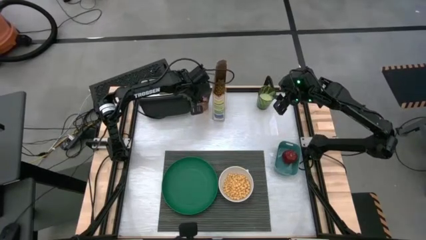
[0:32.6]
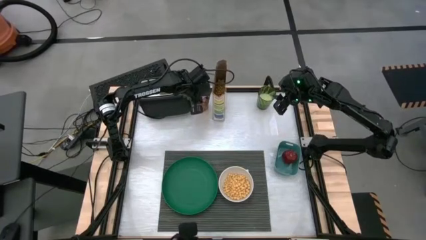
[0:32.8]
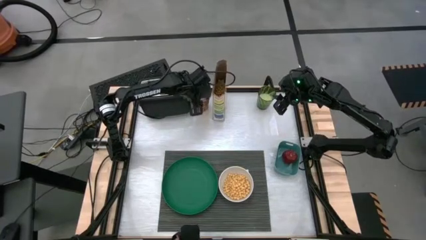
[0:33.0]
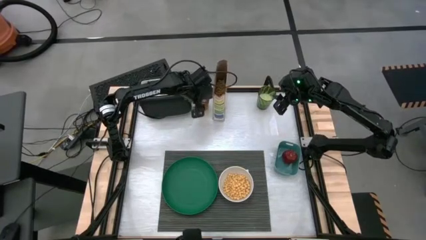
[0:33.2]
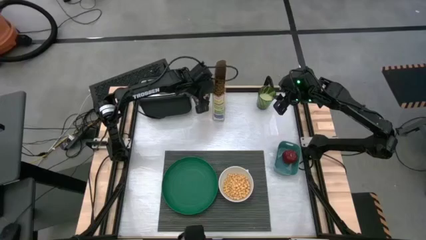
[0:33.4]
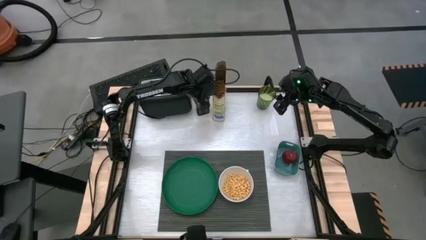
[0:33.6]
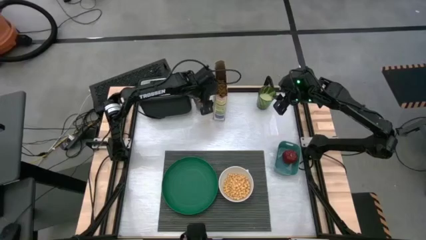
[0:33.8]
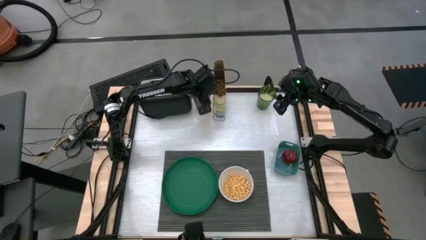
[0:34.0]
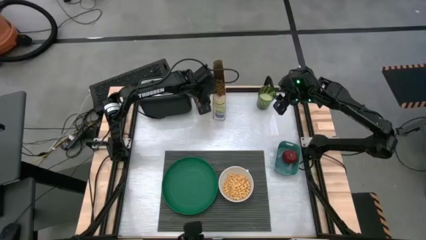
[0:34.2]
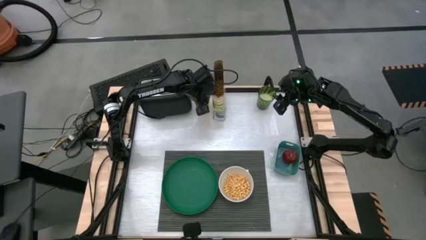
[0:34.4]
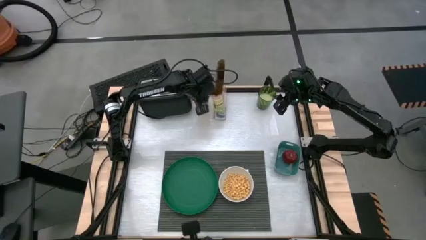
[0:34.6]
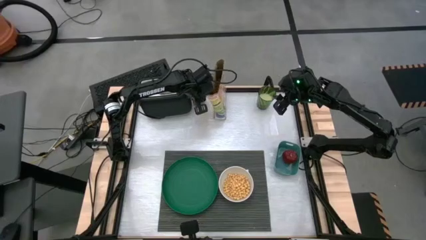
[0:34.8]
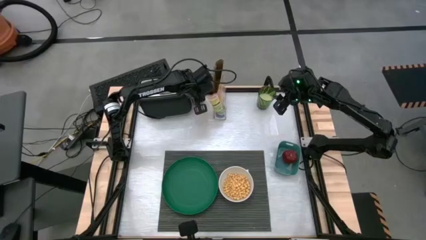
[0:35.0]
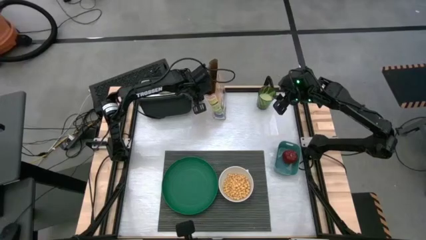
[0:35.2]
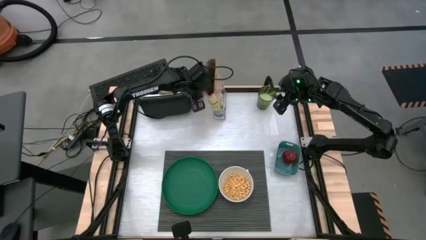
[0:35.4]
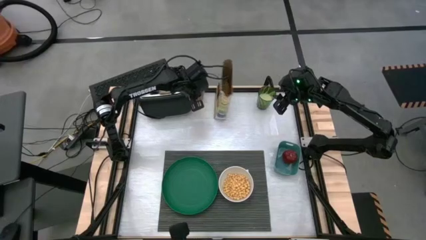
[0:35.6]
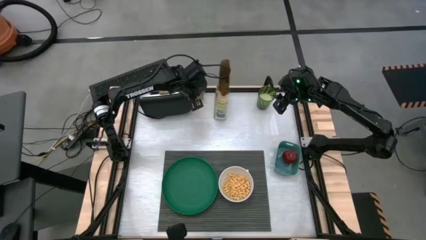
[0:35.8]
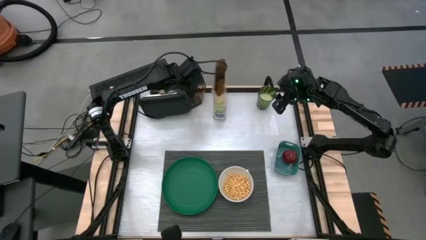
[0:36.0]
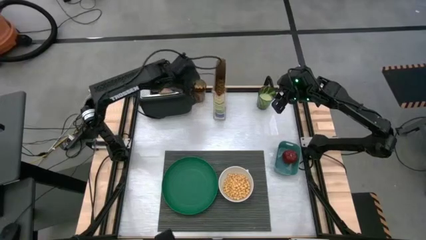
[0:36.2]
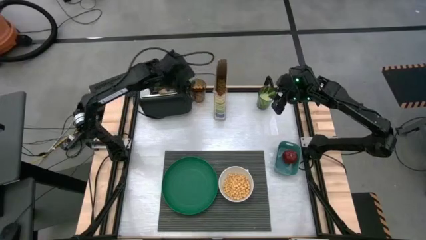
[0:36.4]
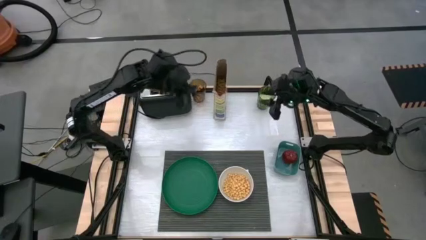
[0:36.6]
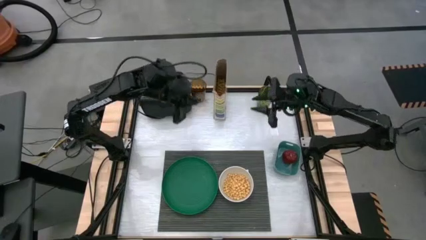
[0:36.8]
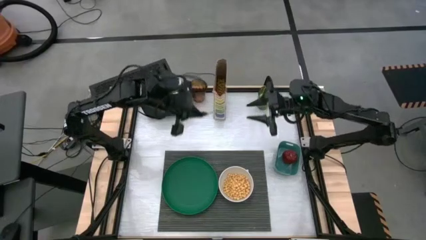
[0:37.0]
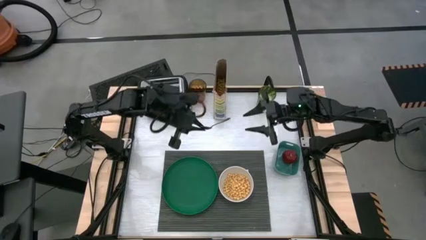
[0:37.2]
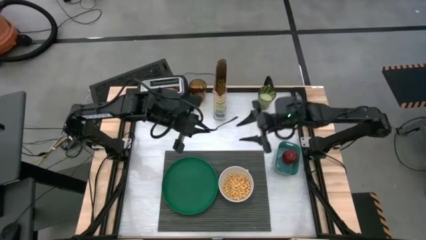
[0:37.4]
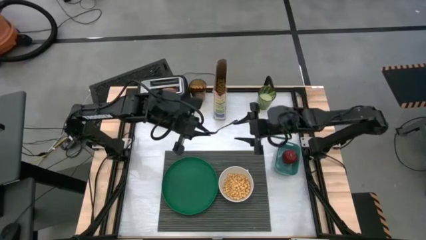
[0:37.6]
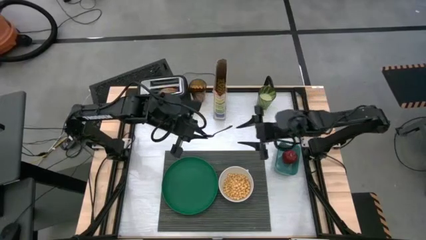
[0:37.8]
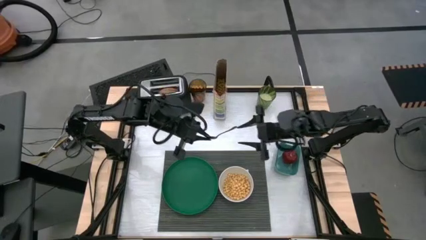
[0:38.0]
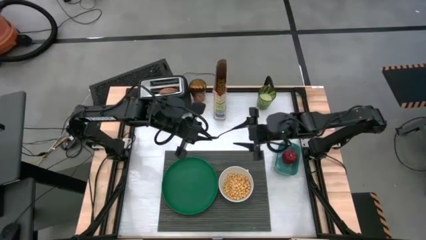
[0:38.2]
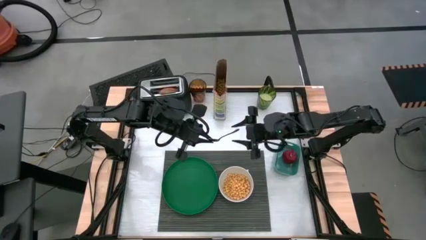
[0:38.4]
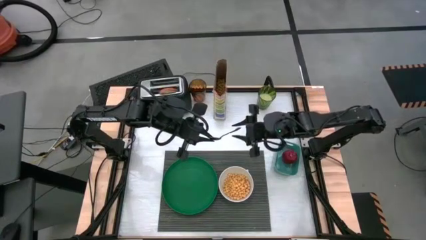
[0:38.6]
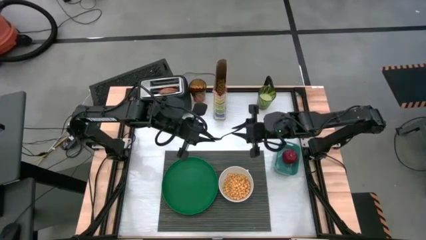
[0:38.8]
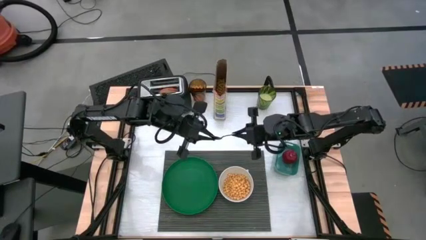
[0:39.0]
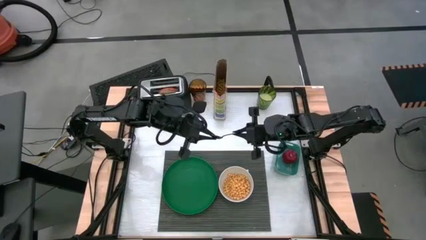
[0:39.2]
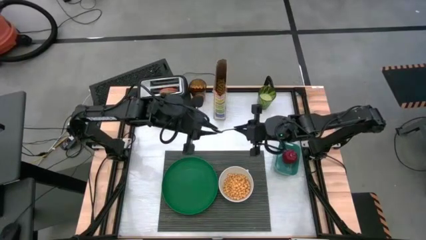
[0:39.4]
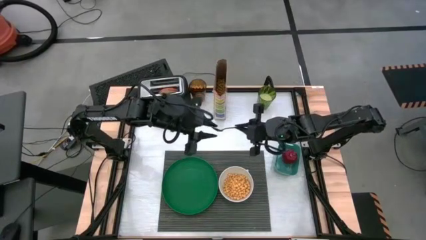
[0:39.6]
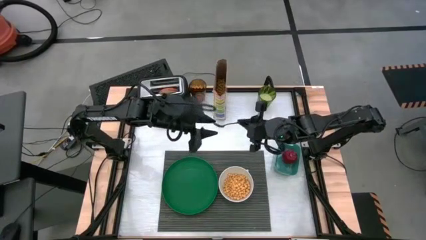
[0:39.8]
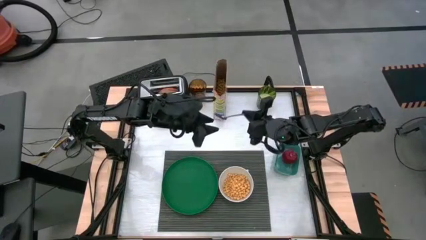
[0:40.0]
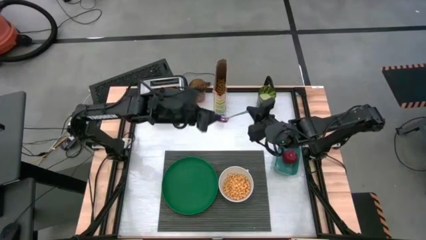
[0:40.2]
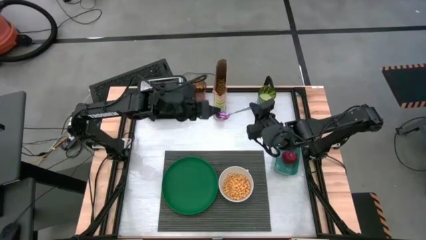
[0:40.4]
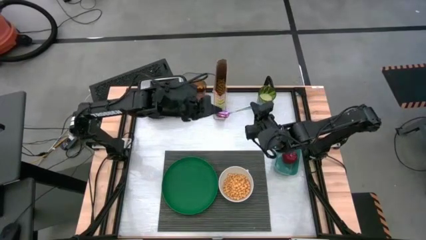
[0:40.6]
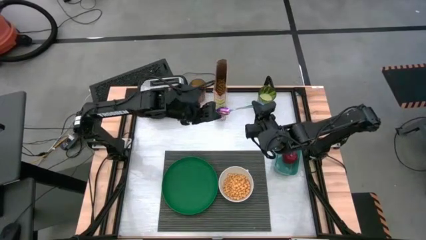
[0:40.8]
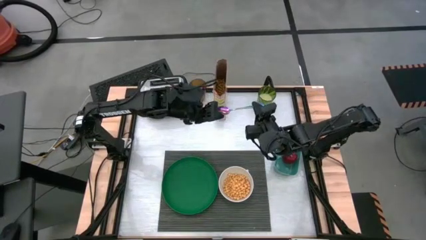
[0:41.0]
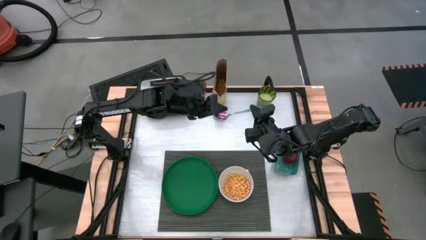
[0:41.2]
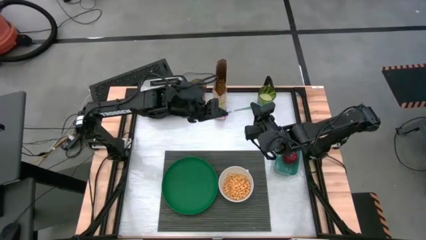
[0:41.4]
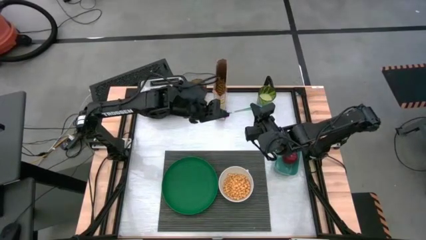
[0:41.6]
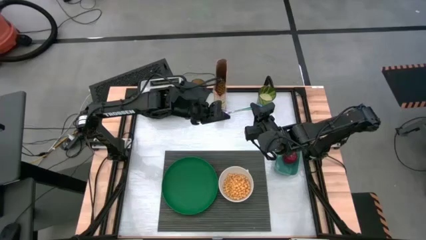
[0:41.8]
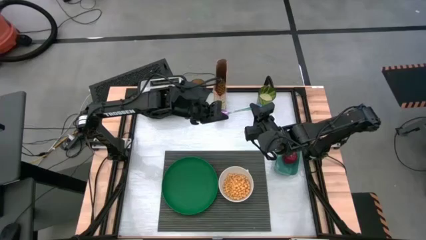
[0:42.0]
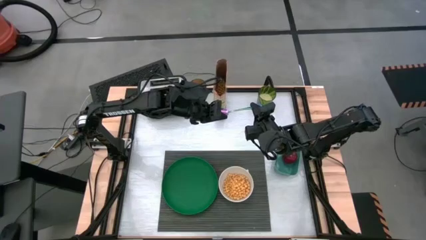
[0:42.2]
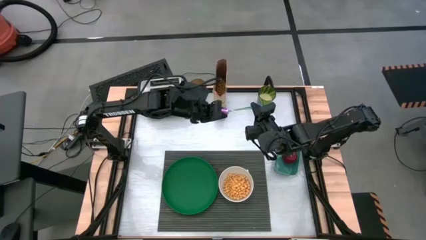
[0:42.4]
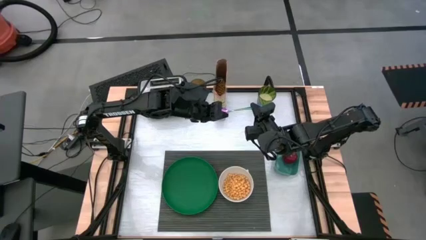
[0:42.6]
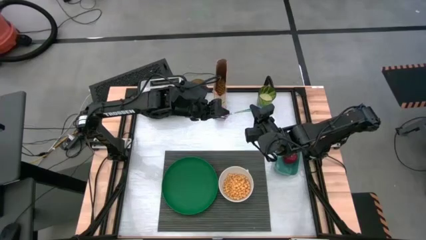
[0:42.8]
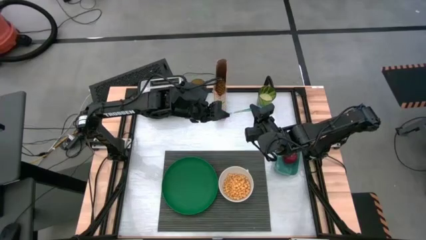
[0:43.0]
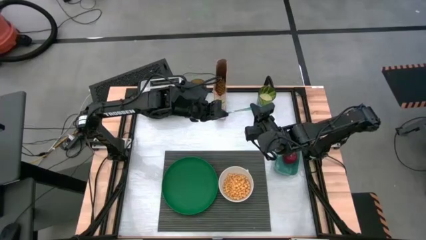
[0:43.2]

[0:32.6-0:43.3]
Task: Arrange a breakfast setting
Put the spoon beside the bowl on the mat
